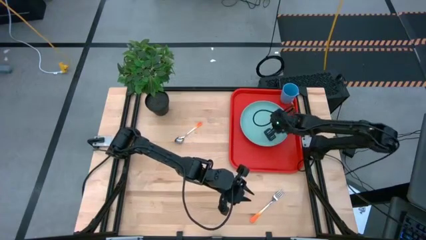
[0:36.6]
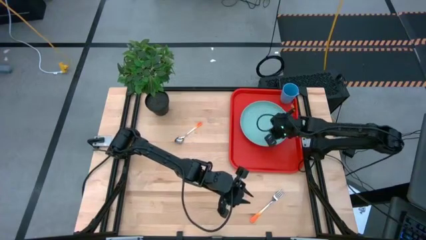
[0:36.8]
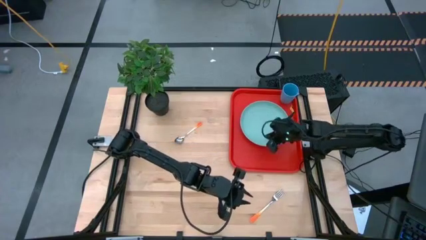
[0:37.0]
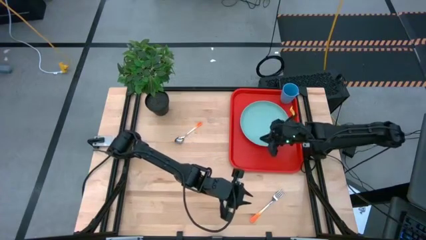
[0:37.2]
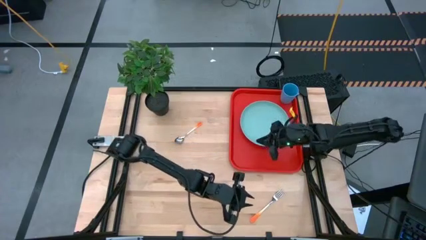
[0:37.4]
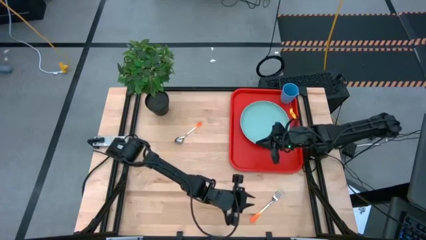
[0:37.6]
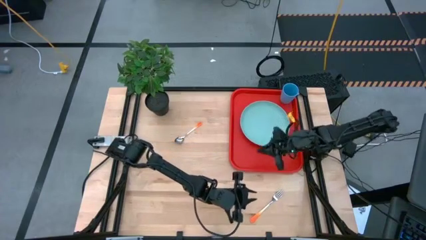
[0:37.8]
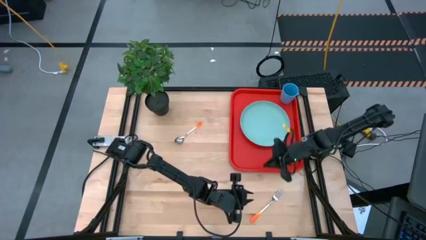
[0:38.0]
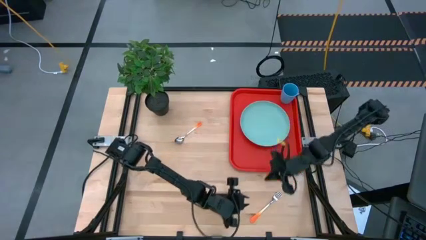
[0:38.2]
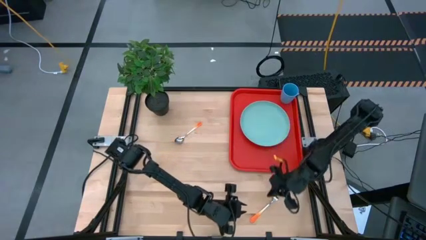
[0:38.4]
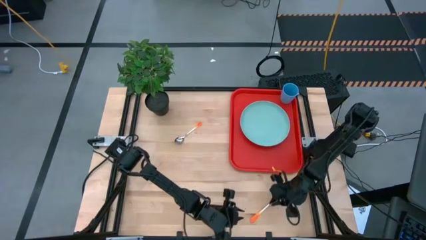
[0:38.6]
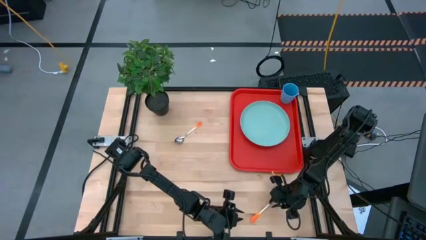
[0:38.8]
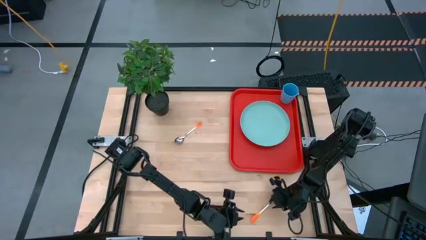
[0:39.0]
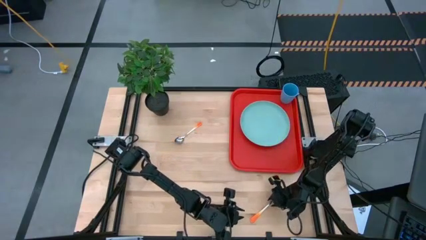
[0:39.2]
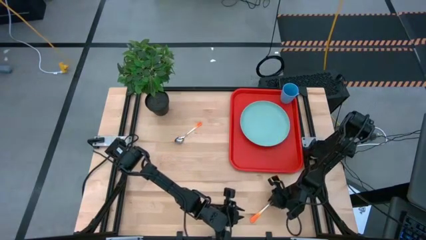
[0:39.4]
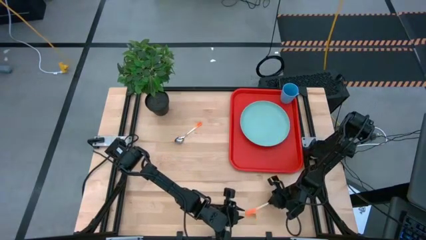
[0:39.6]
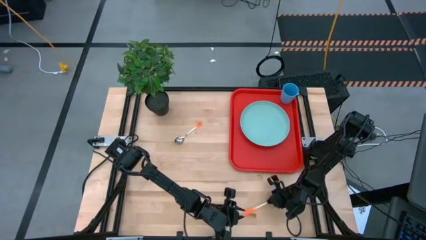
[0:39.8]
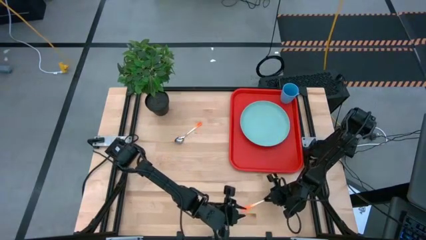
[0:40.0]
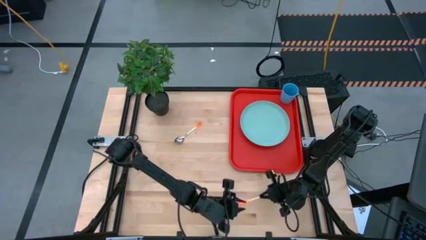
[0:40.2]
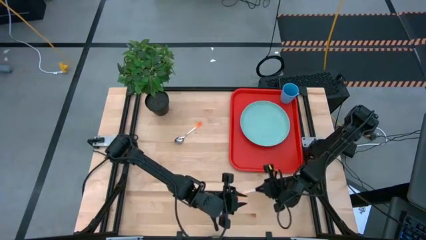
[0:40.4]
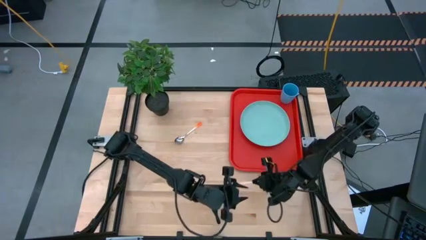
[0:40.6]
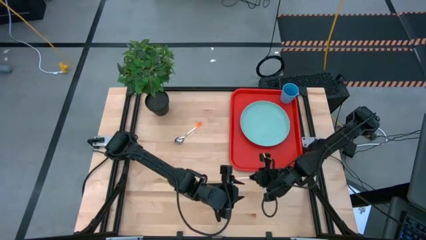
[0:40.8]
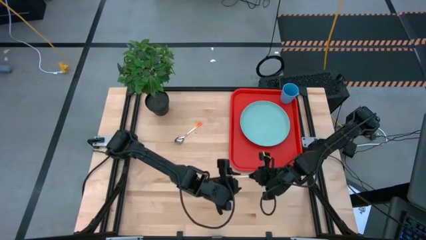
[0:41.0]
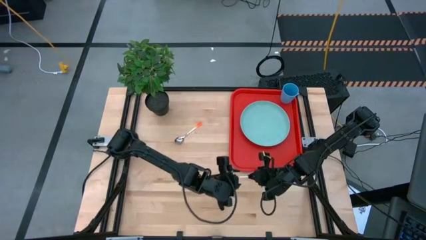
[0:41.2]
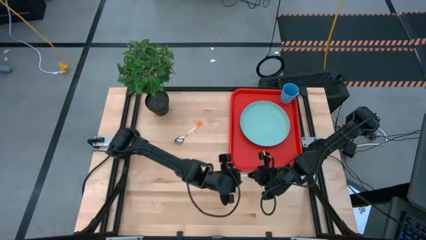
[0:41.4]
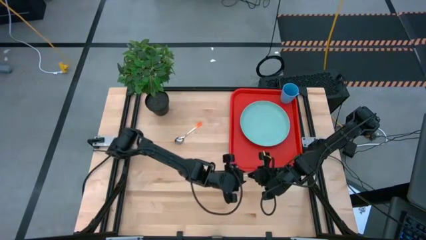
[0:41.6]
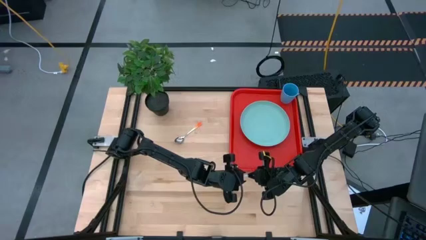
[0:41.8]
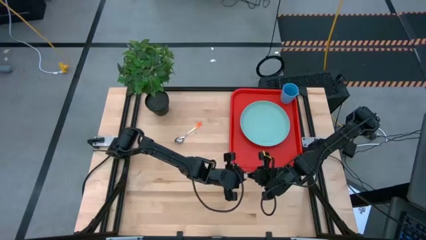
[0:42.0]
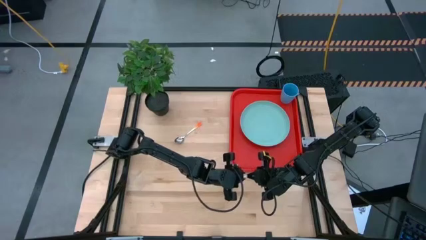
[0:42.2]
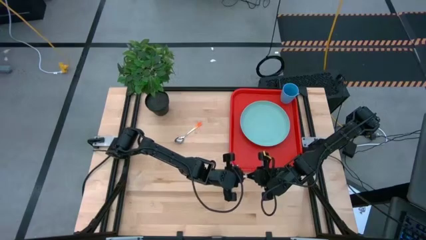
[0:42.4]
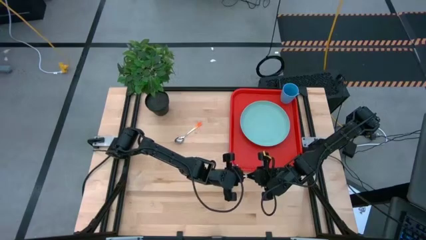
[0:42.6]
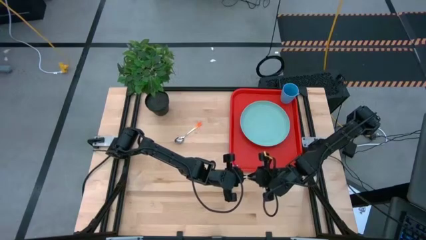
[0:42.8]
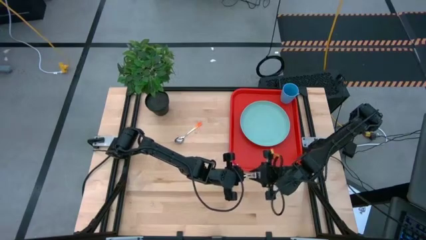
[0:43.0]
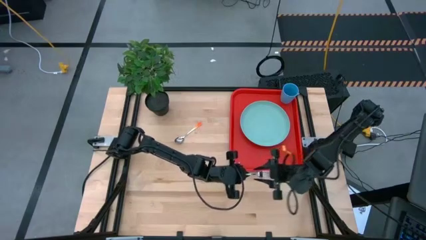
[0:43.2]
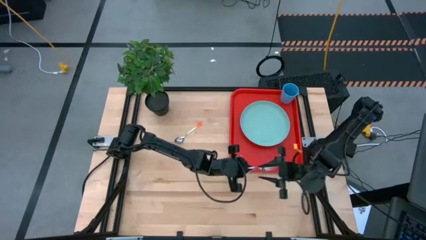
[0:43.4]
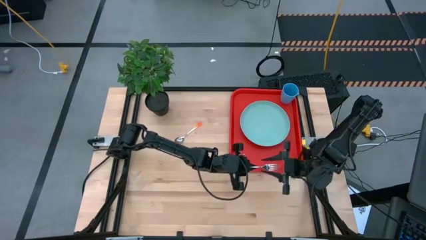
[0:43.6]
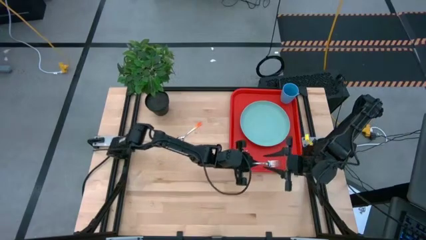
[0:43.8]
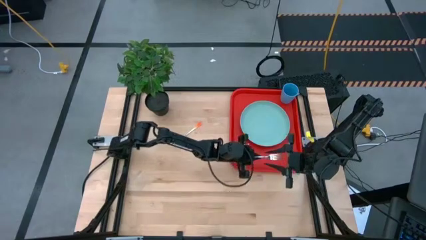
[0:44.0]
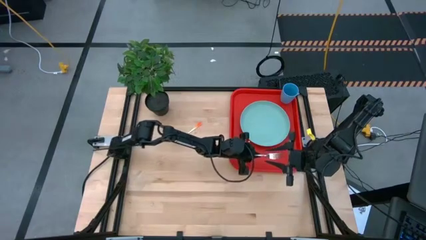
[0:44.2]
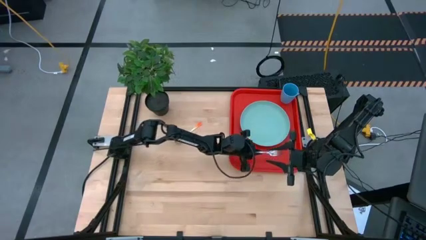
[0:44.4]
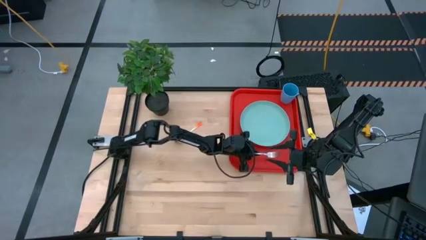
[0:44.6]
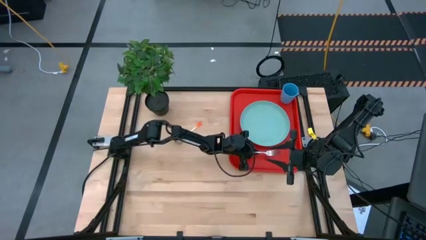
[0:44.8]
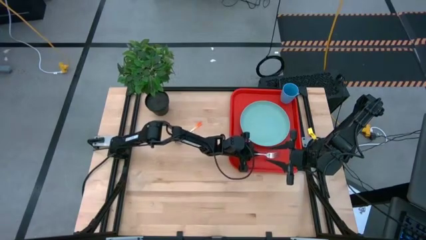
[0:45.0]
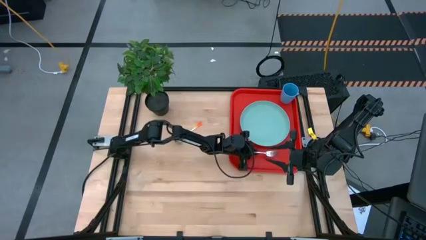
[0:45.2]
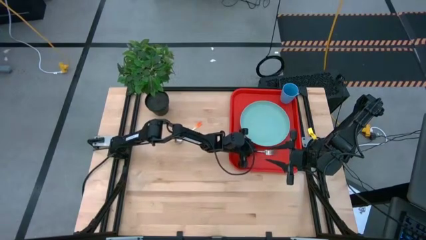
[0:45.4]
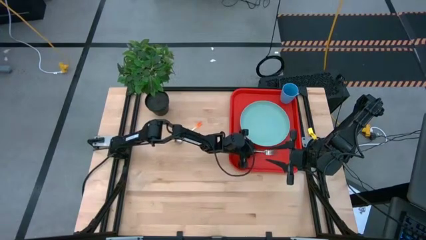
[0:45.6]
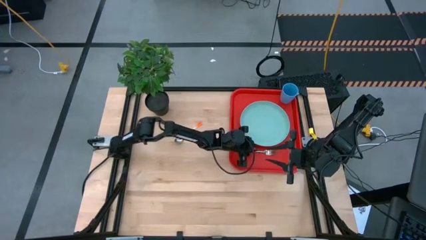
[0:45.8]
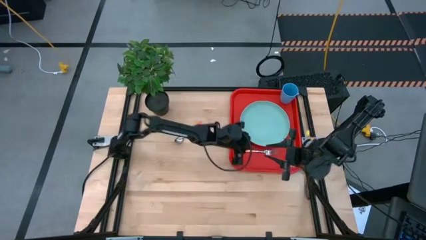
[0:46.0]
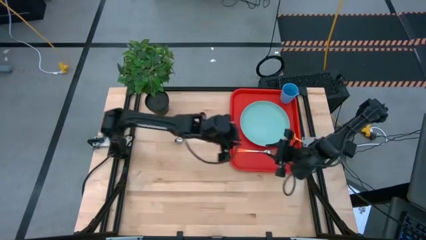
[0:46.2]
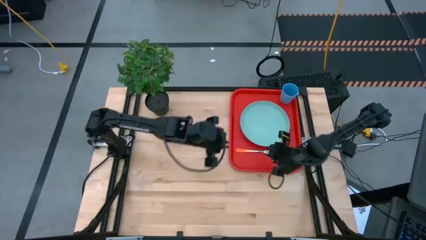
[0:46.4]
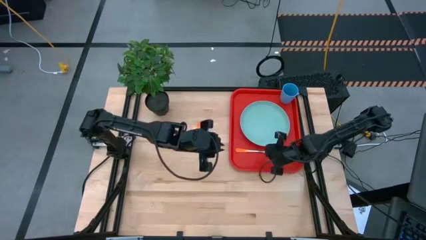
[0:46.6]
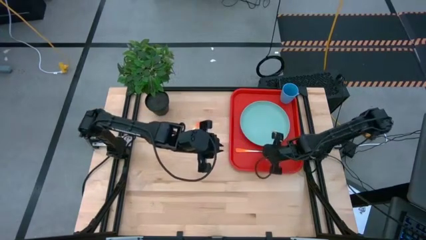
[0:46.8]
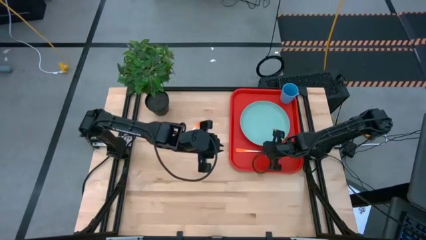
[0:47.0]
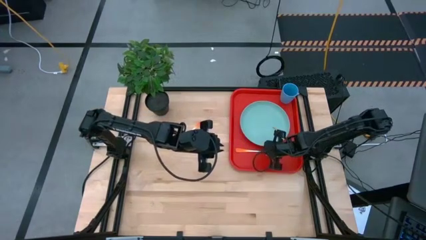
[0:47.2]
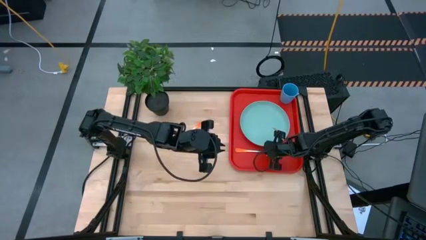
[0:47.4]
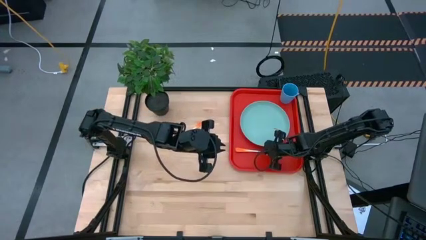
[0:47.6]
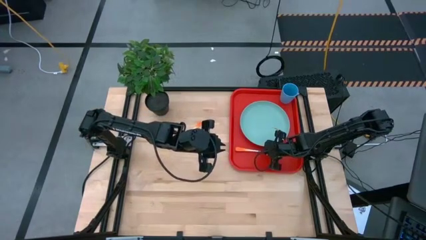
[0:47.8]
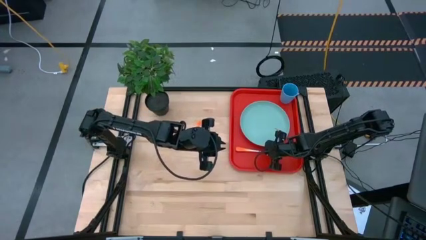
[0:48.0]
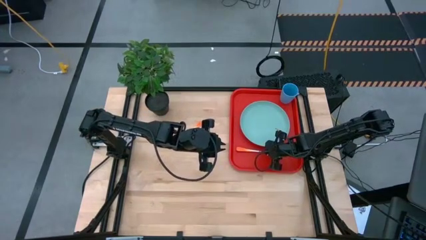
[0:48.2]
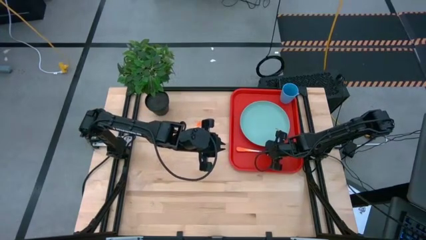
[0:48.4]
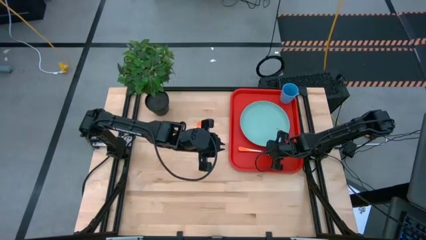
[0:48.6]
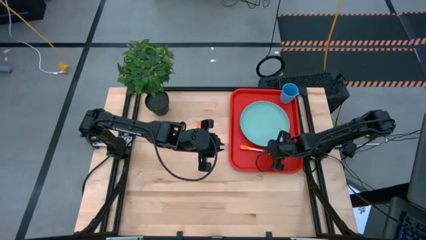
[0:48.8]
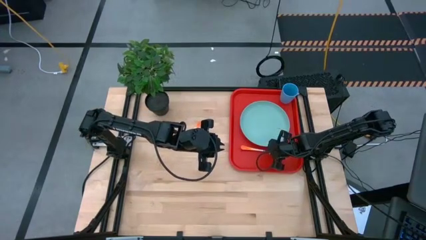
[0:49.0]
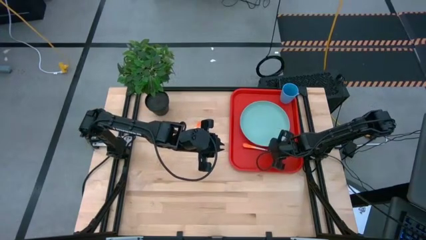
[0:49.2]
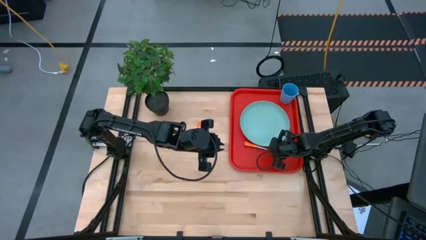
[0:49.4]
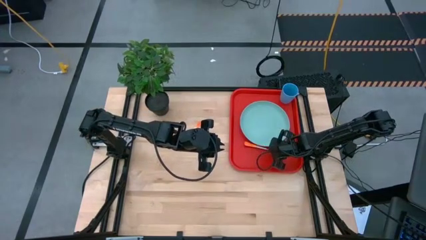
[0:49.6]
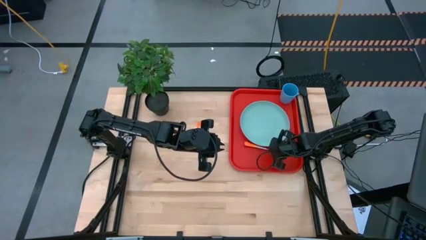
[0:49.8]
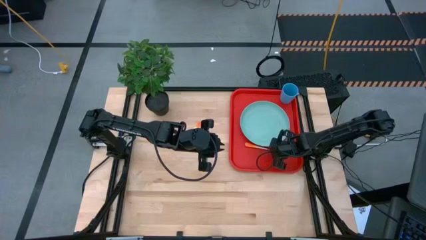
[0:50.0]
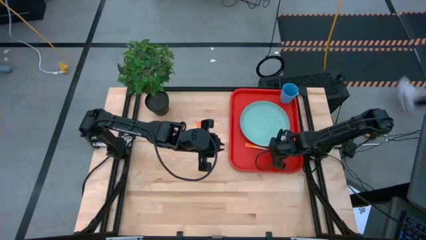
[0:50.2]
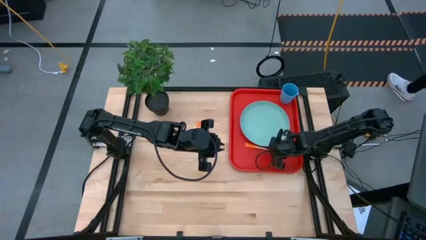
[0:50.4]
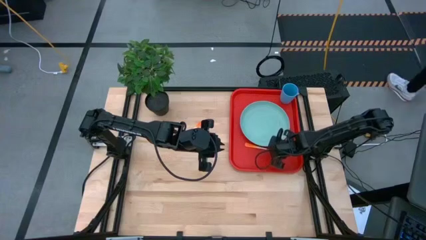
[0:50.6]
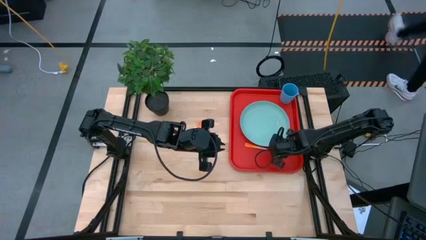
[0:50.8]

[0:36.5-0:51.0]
Task: Pick and place plate/cup/fork/spoon on tray
Put the orange fork on the red tray at the bottom of the light green plate
